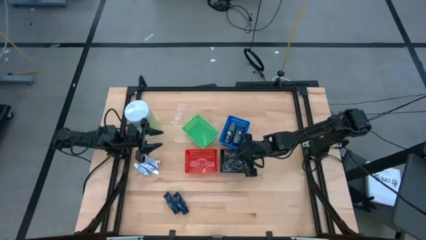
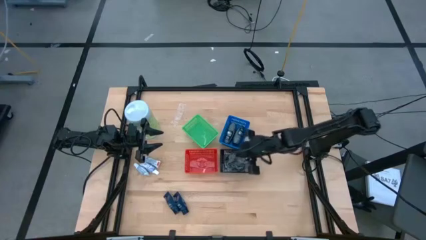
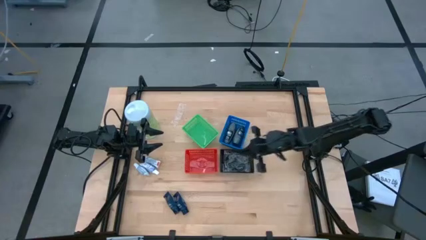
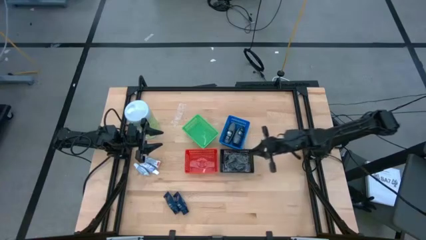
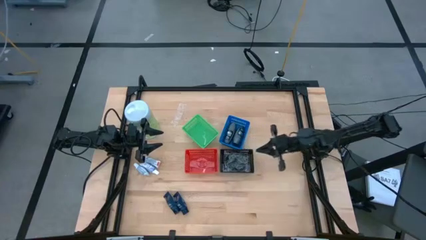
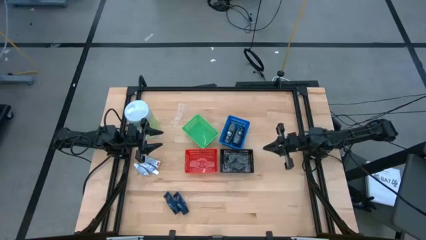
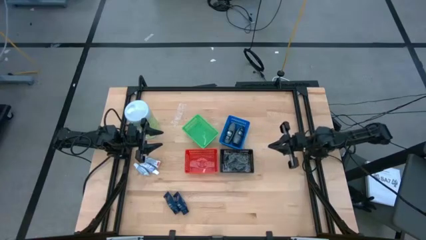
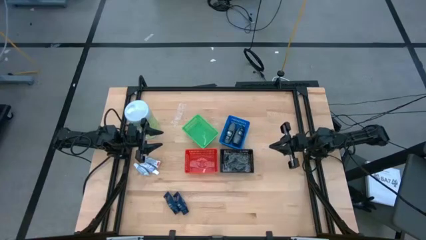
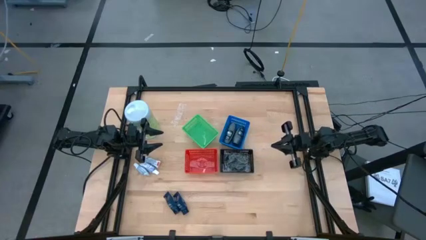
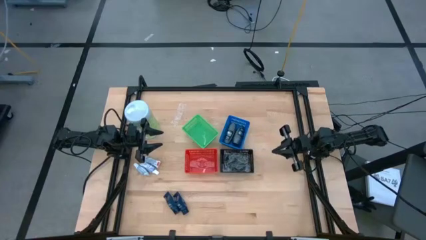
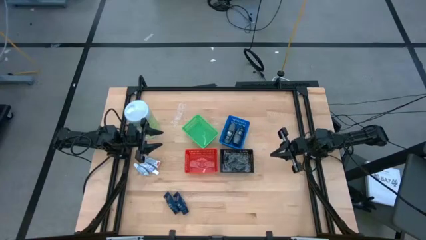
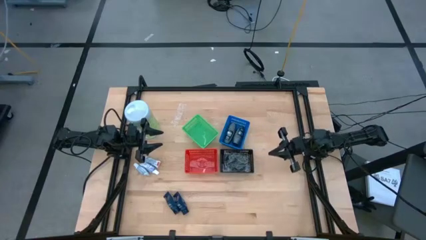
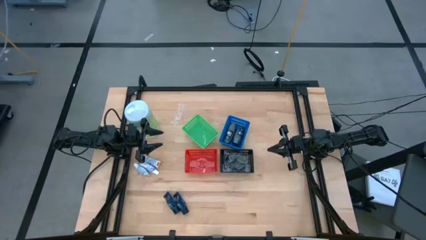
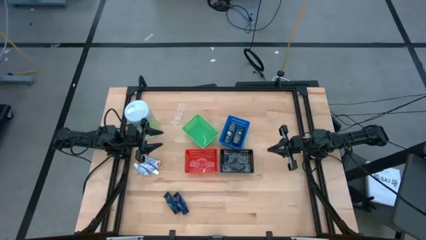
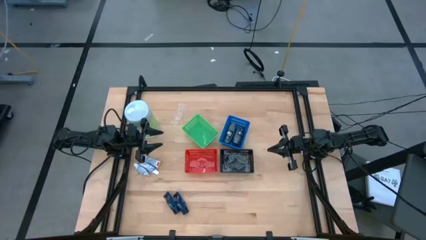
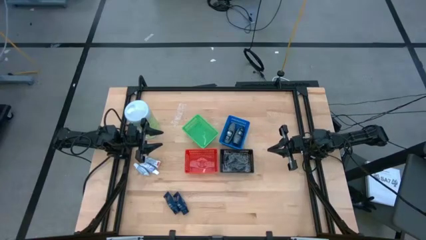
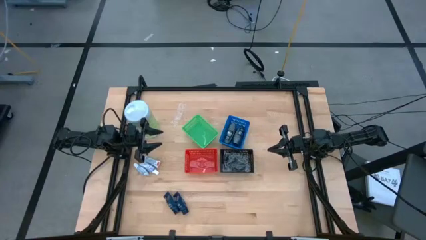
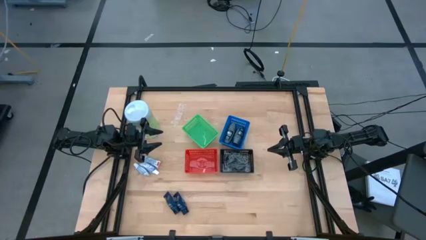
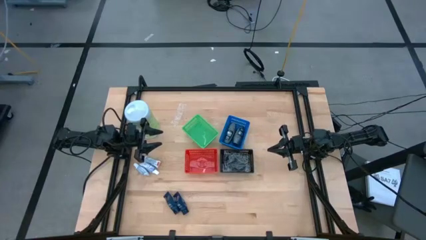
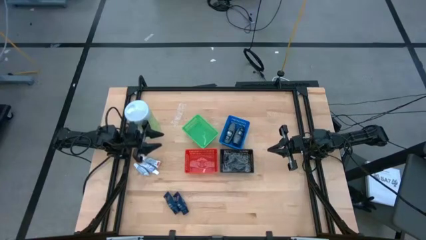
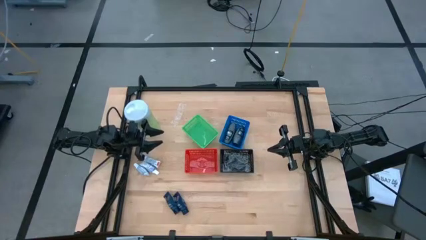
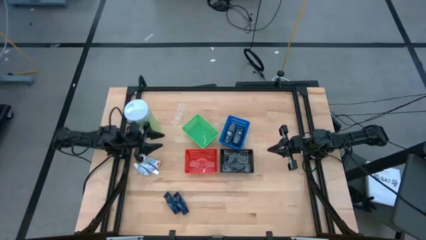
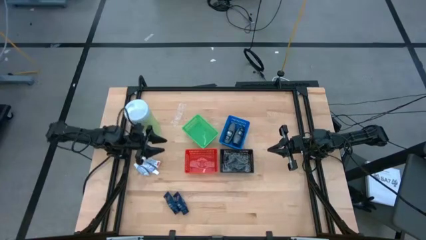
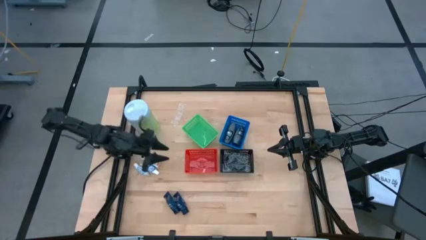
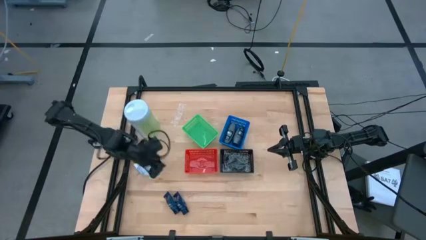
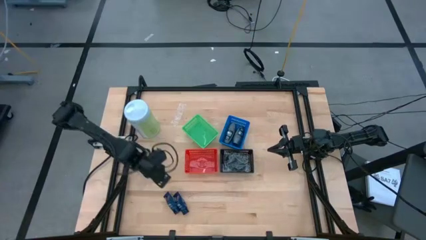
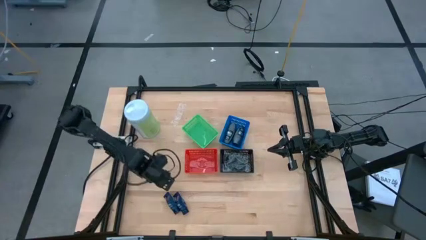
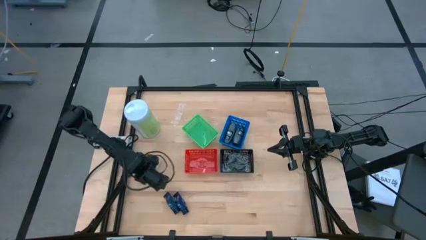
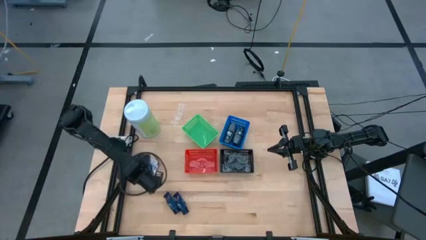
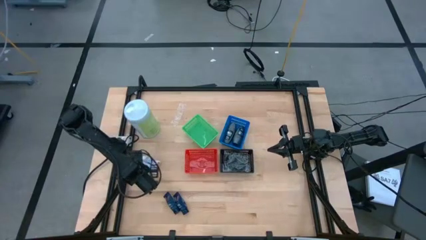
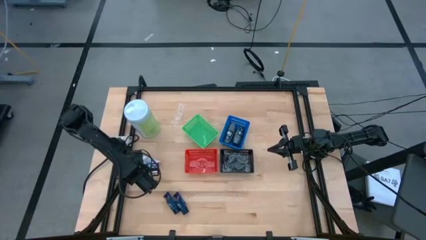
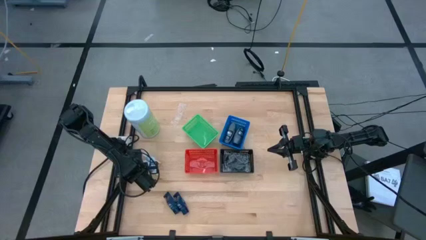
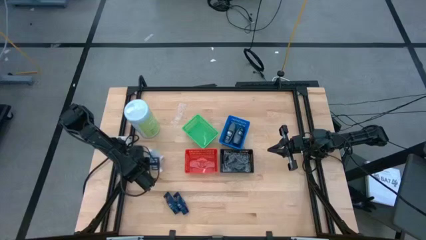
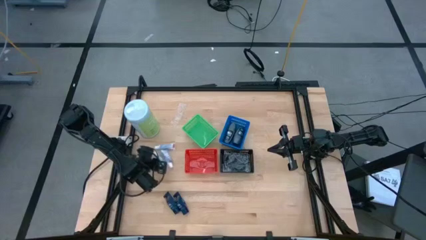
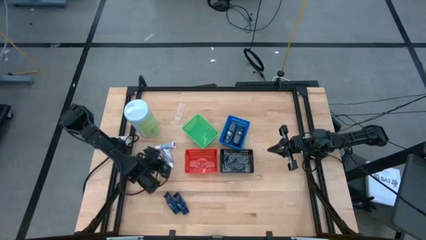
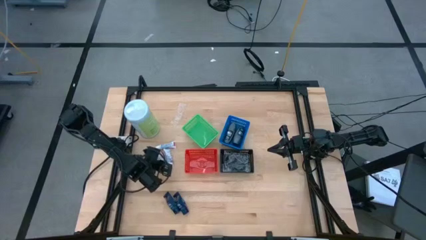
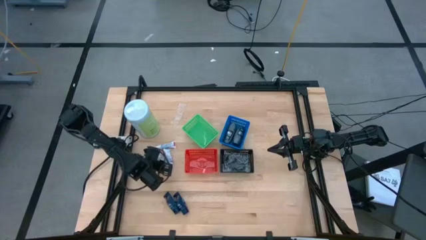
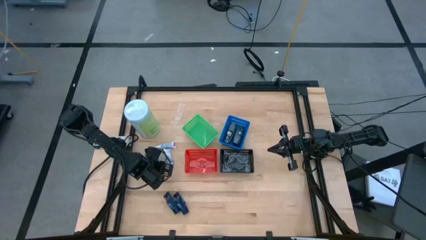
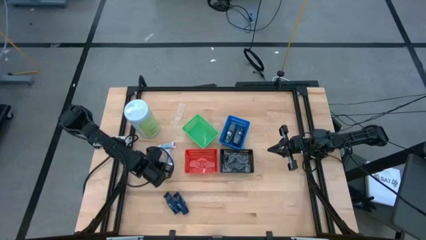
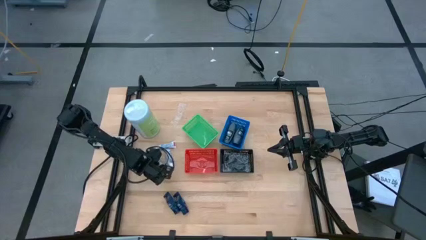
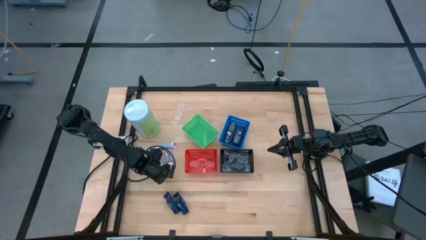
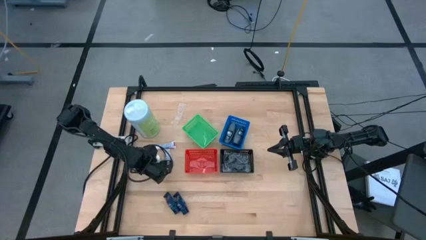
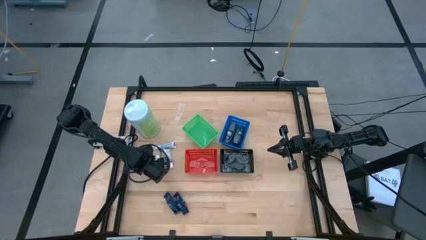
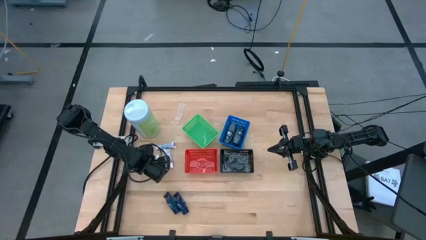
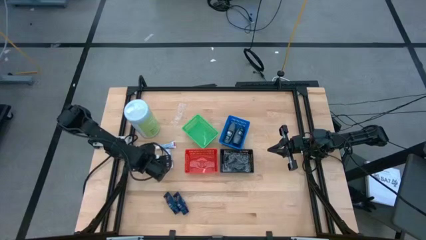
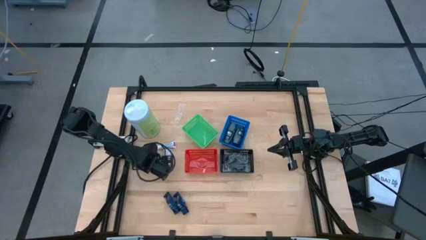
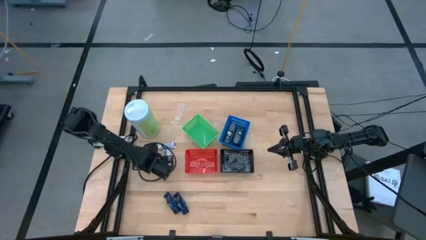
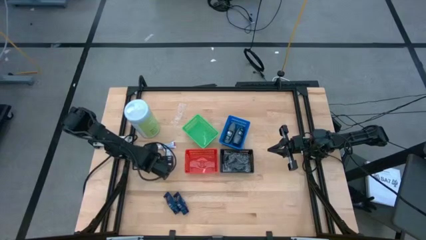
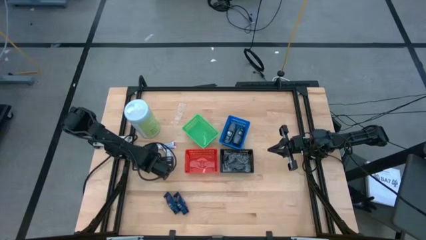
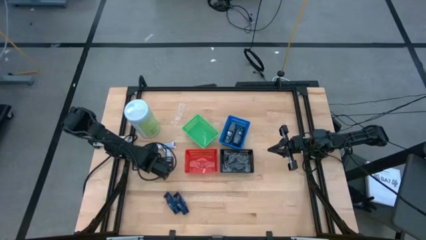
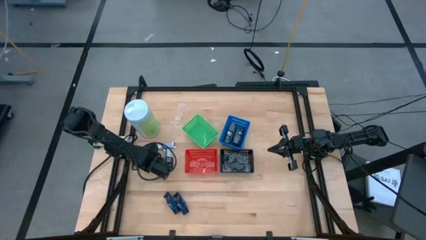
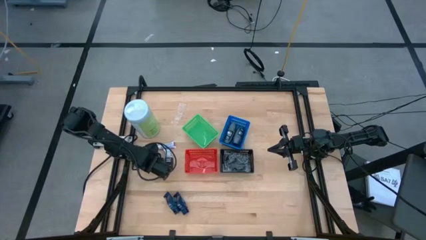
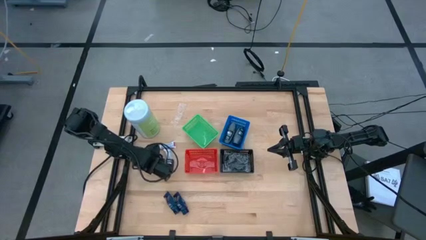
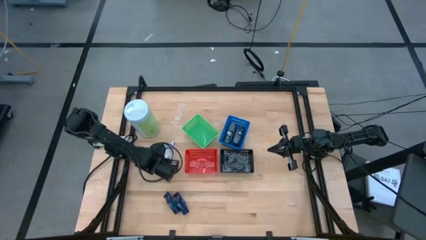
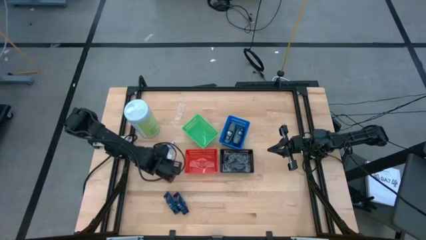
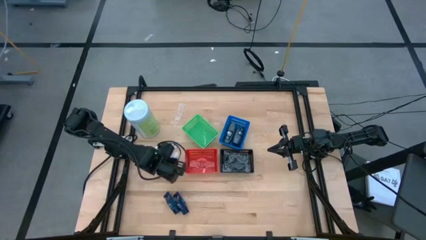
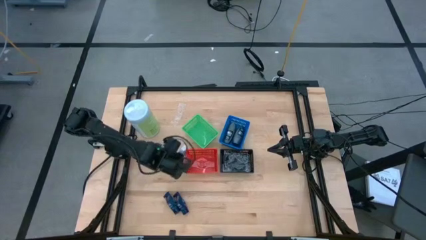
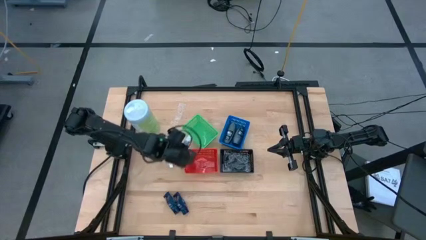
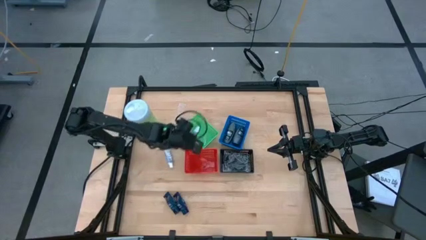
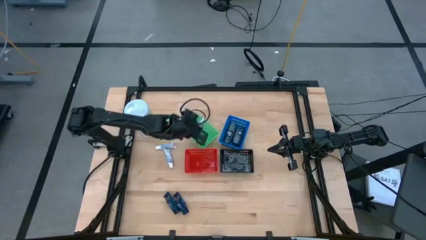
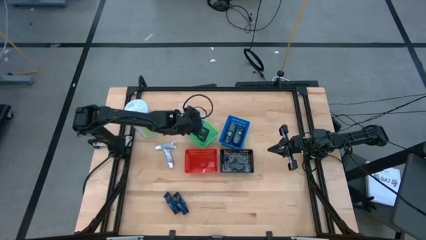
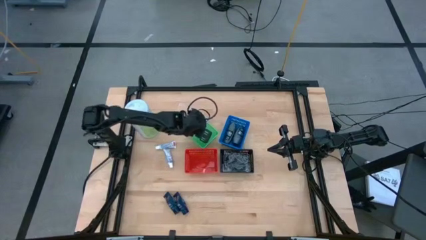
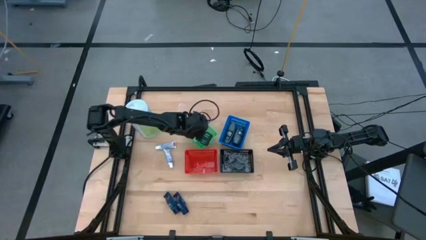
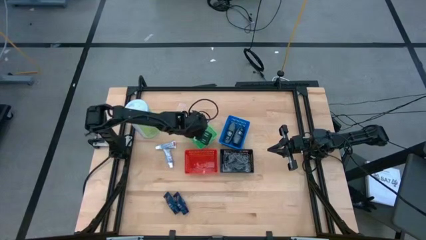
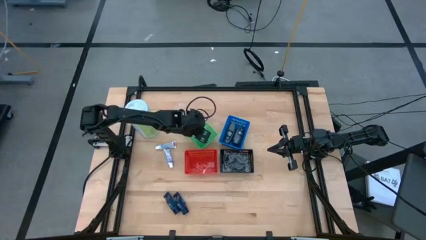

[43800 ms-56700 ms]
Task: Pick & Place Travel size toiletries
Put the bottom toothpaste into the green bin

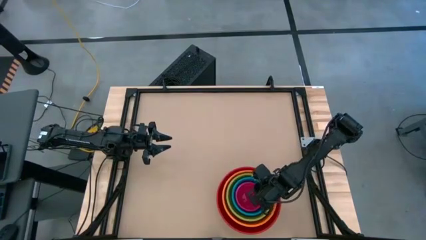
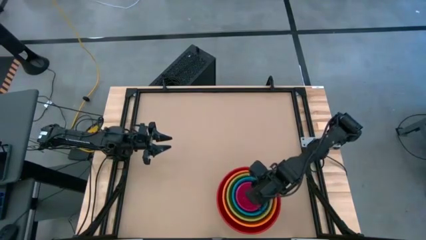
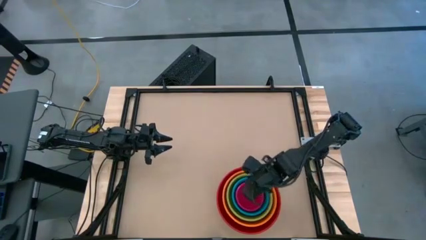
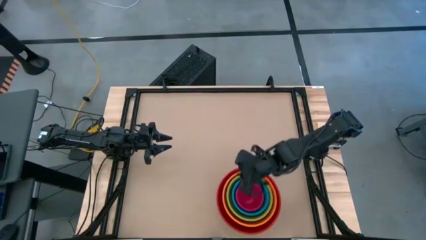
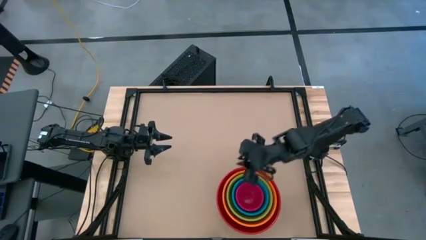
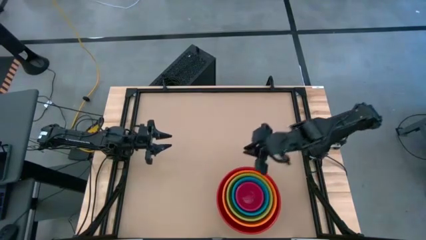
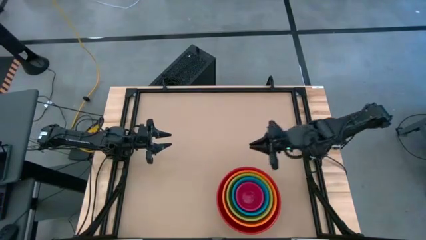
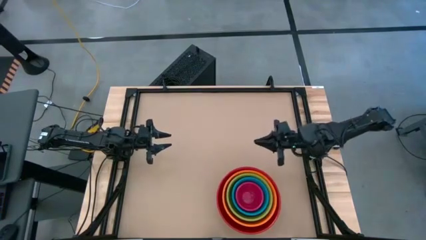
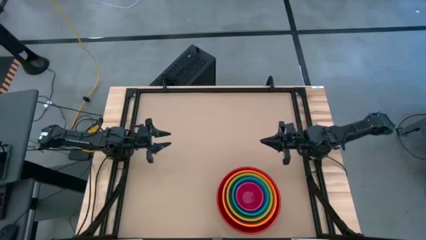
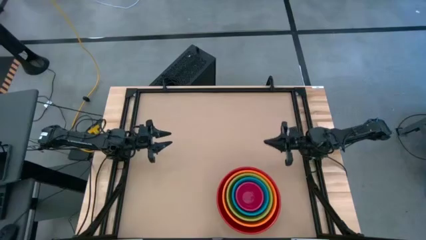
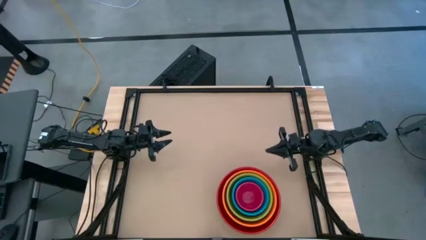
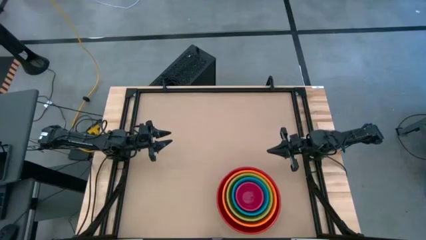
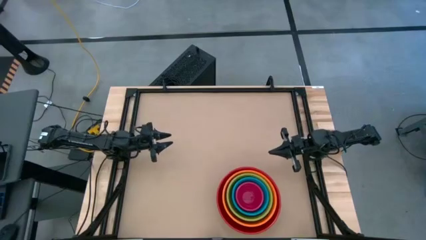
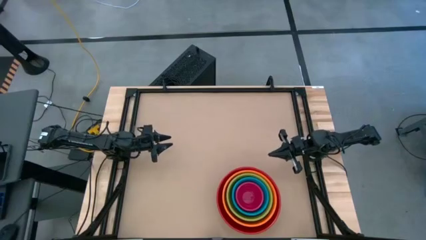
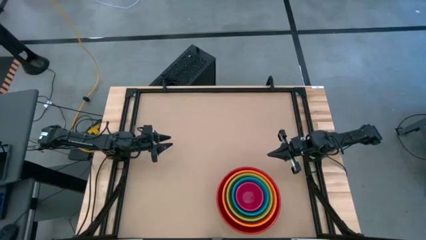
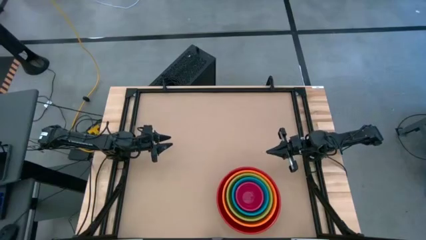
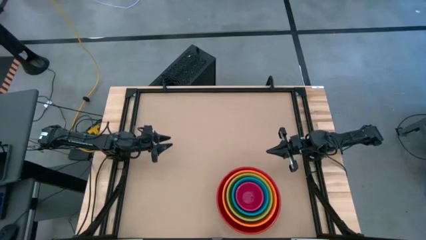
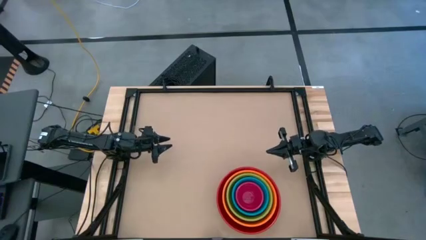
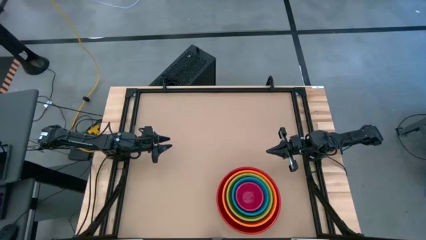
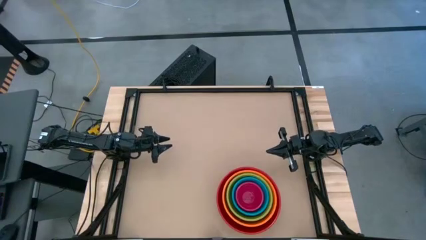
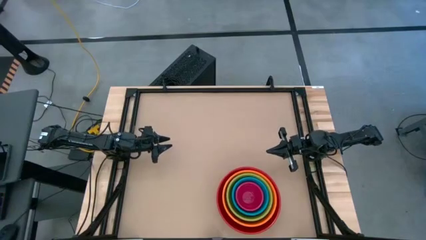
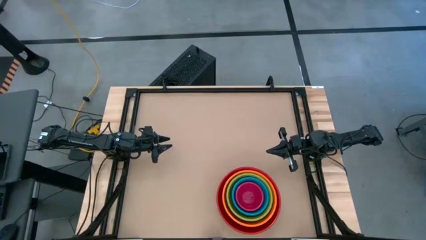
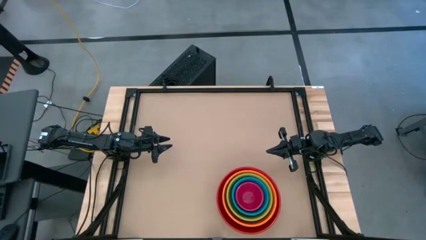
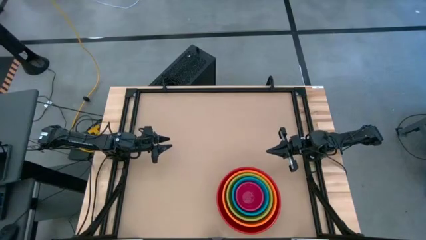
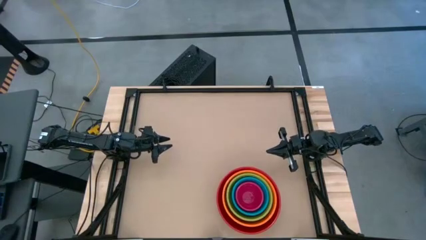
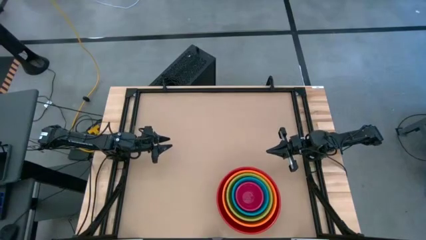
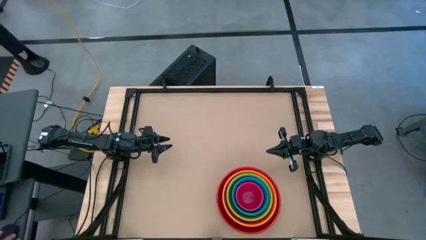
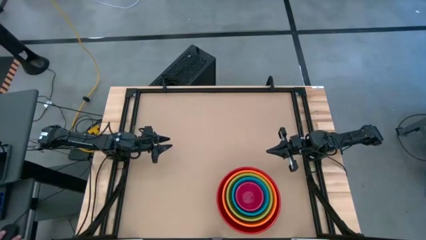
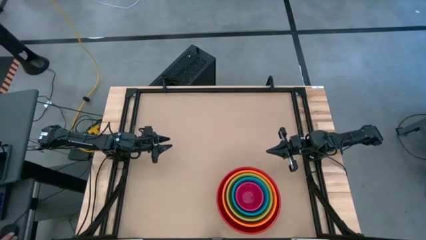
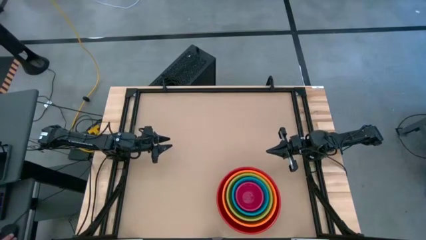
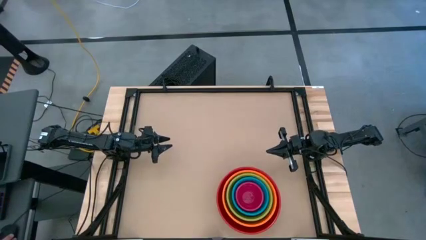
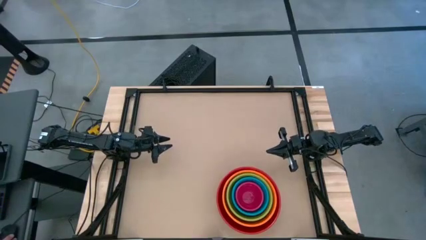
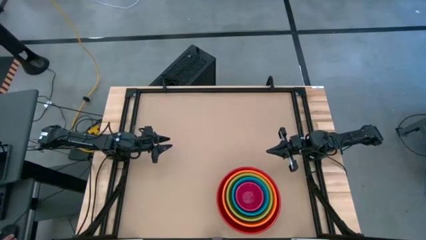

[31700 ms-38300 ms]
Task: Nest bowls inside each other by size order
Return to Home Position
